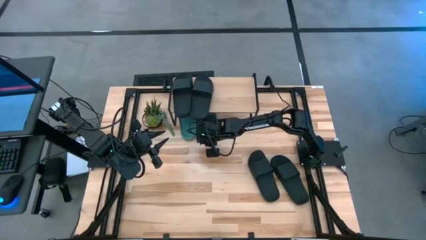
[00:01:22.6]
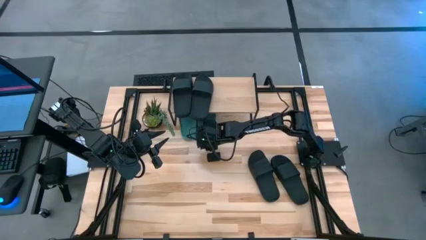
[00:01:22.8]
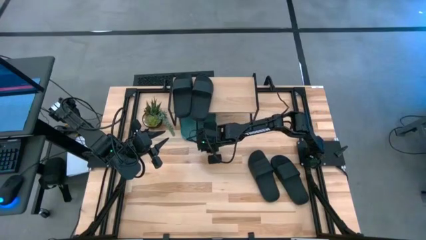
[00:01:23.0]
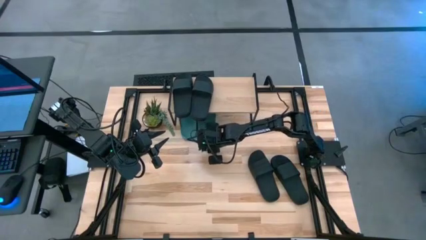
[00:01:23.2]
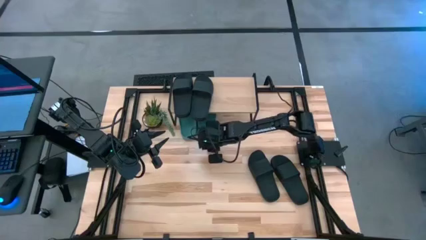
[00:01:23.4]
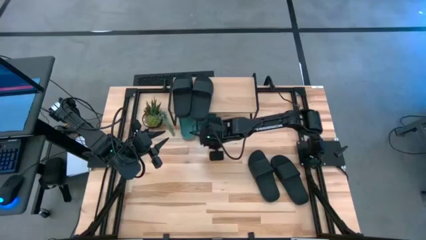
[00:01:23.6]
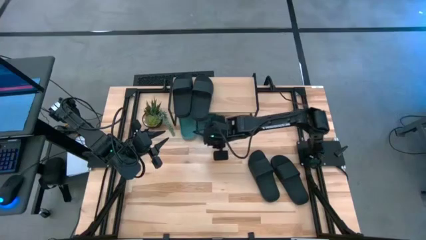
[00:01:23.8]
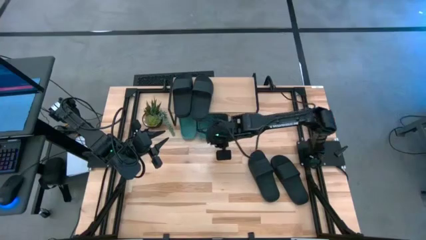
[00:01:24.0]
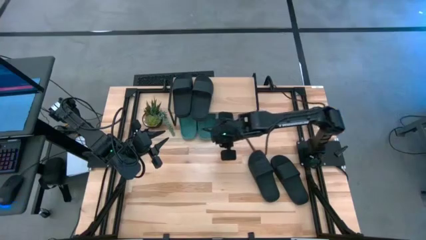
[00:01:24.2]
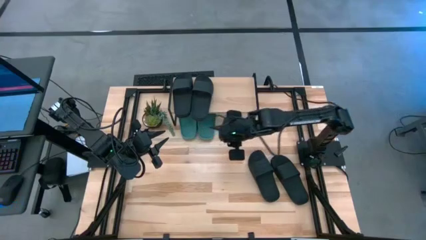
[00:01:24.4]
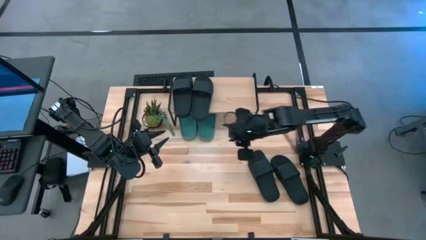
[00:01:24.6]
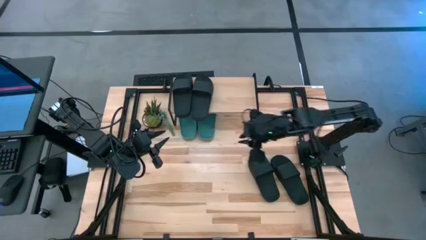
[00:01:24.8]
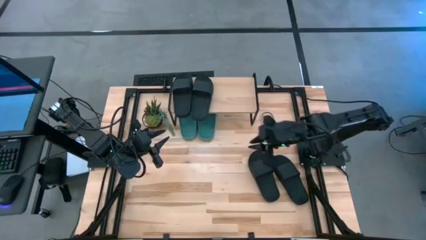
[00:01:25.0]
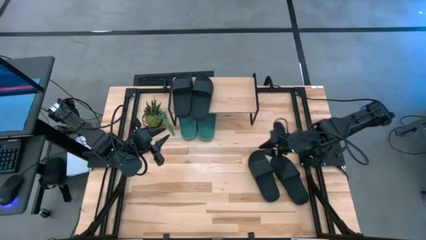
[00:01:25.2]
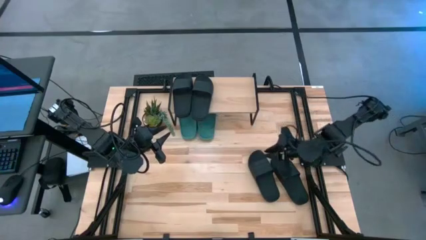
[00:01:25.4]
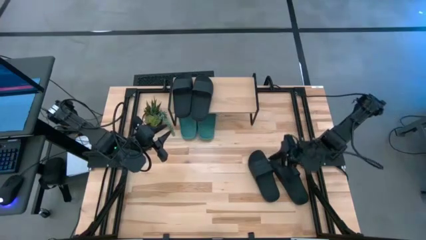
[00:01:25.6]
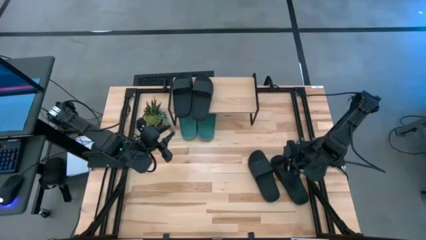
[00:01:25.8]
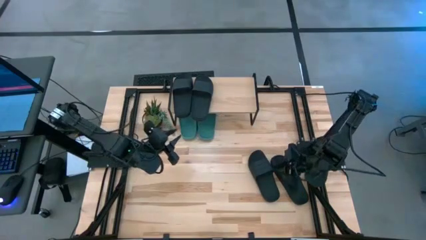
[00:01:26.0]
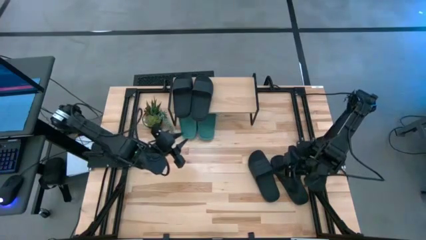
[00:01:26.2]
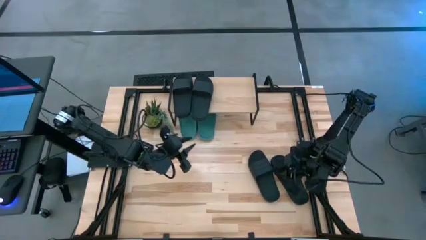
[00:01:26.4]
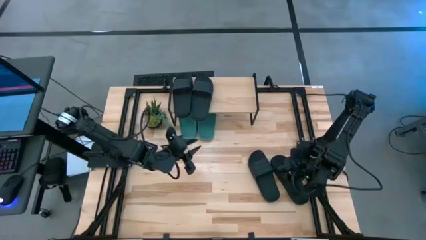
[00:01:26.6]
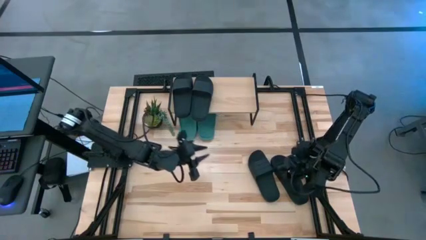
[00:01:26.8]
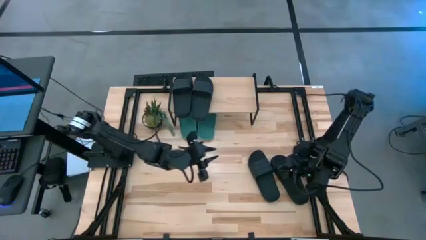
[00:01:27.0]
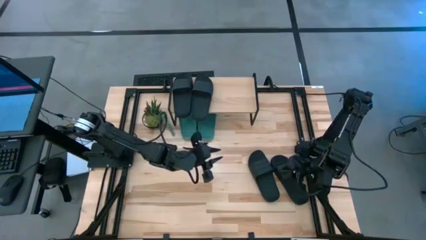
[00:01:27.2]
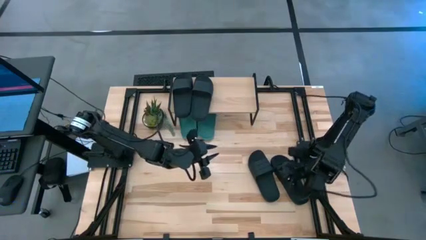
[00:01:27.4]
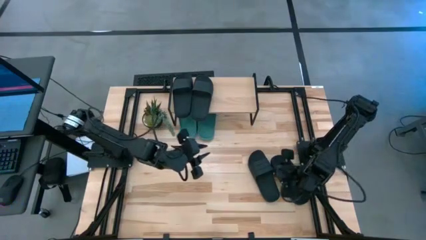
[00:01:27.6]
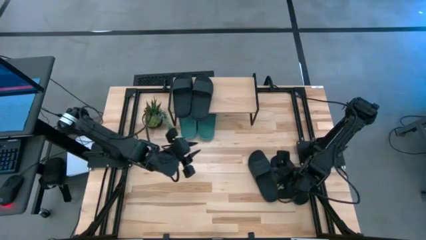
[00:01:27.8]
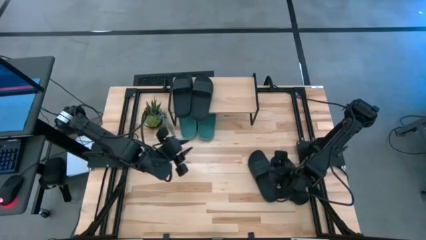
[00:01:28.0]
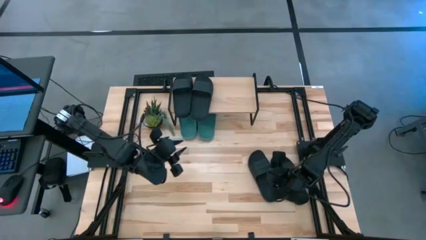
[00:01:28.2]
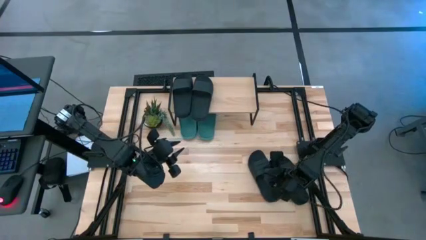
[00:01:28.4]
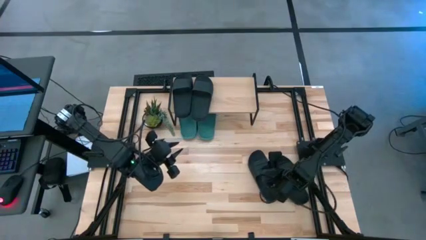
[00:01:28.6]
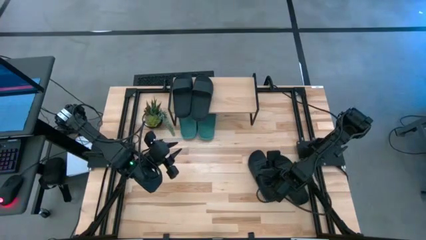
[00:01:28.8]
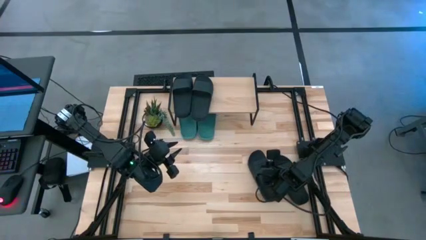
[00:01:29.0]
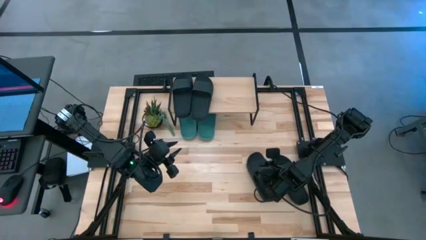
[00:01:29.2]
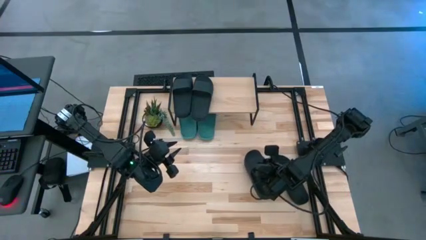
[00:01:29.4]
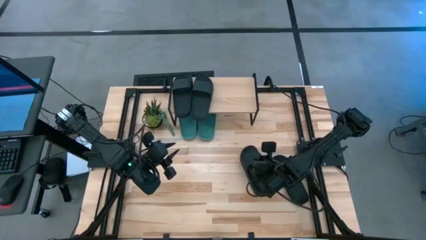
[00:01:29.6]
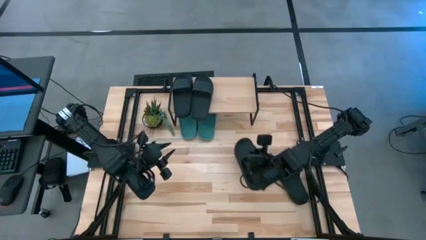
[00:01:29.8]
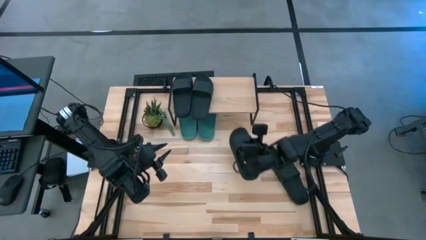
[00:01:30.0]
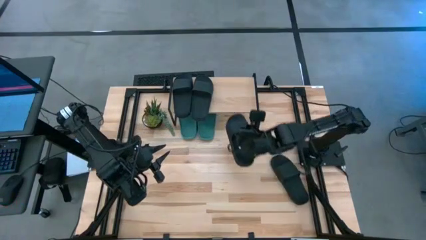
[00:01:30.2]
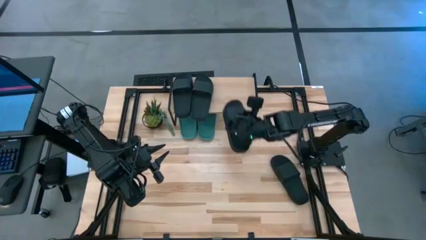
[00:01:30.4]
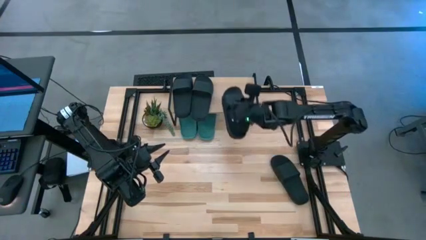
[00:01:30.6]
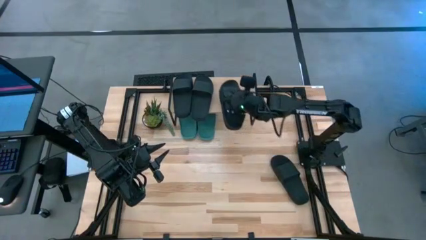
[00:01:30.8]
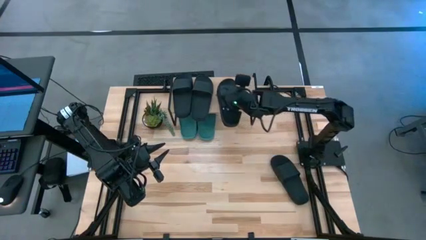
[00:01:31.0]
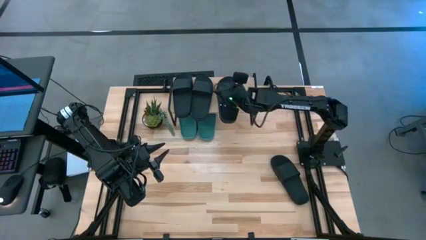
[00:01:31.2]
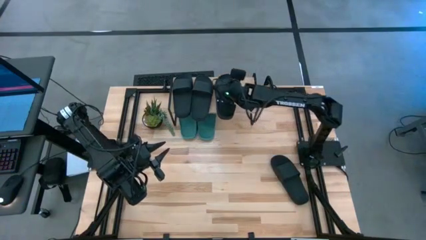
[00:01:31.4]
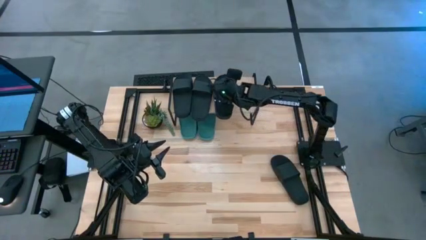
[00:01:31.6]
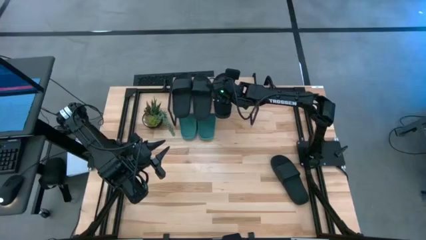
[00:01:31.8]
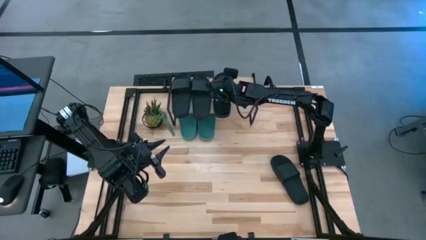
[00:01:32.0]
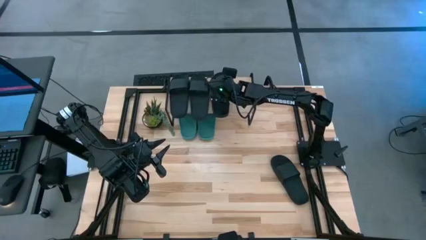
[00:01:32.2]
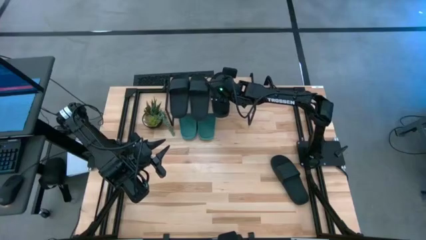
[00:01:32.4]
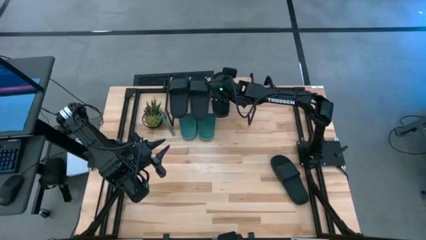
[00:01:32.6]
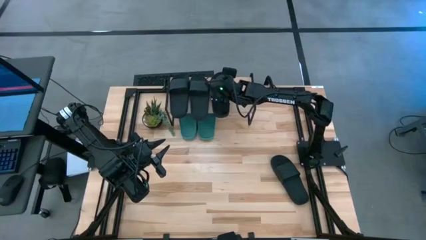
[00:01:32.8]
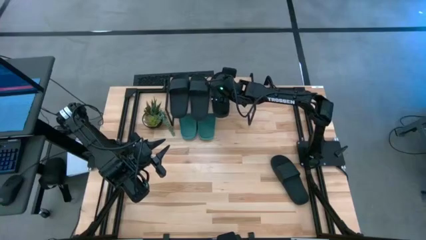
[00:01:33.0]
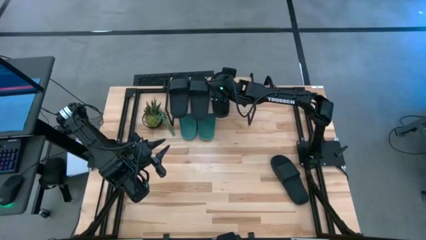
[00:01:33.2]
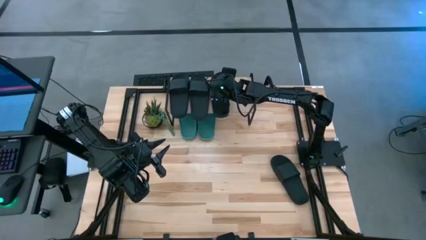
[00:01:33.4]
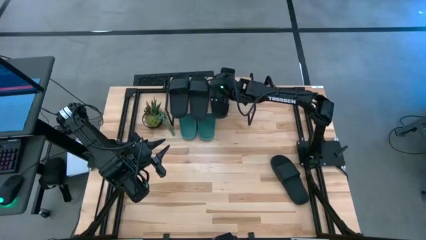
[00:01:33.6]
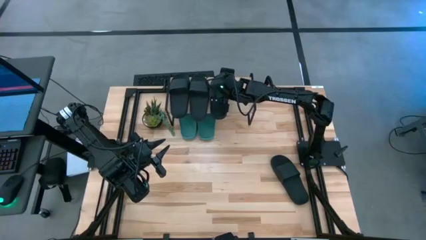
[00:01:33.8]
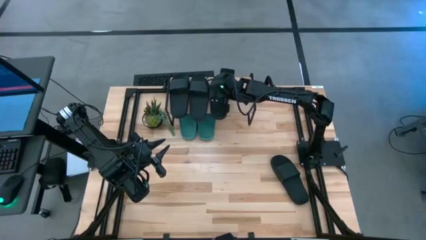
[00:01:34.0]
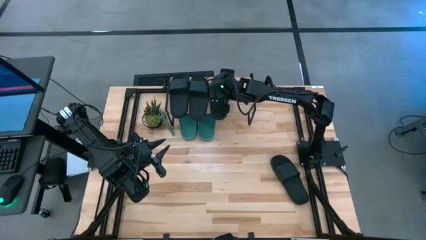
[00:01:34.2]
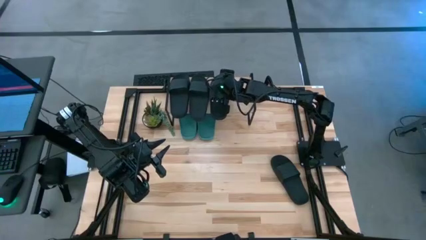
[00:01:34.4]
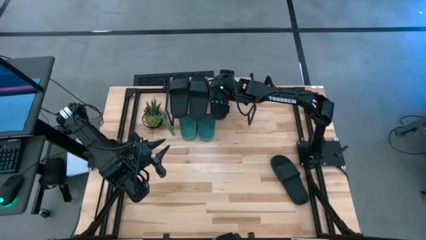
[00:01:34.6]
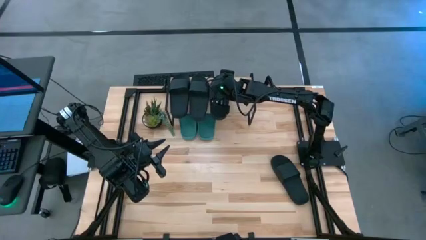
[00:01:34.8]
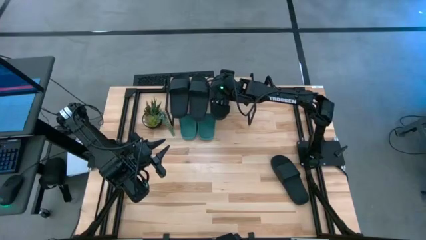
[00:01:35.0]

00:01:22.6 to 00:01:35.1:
Task: Pick and place slides into the shelf
Put the black slide on the shelf

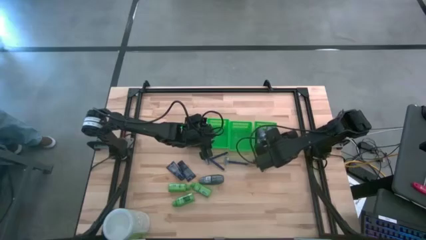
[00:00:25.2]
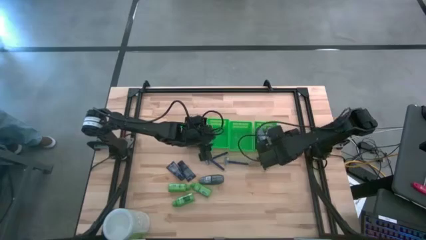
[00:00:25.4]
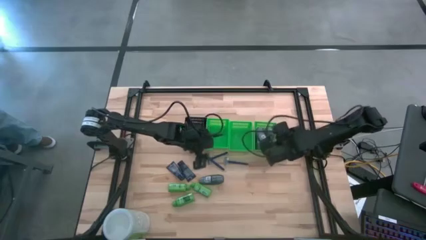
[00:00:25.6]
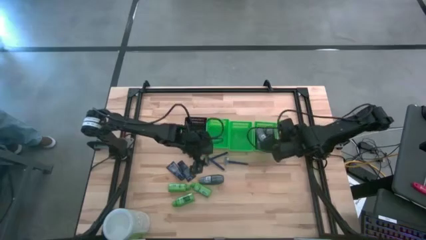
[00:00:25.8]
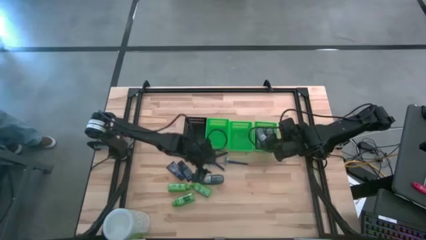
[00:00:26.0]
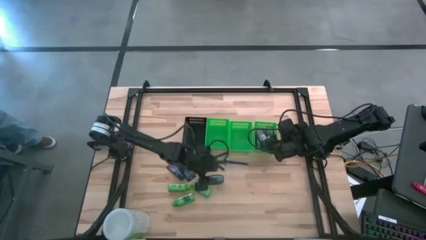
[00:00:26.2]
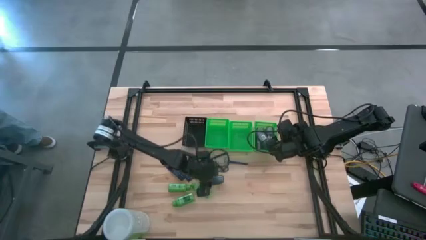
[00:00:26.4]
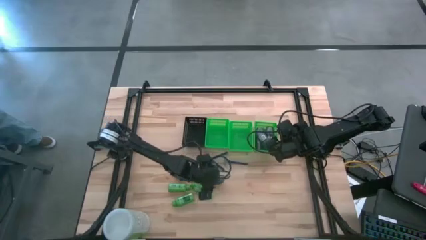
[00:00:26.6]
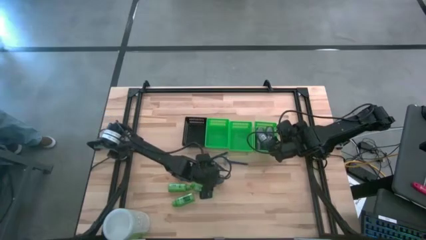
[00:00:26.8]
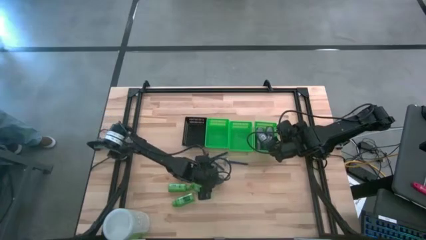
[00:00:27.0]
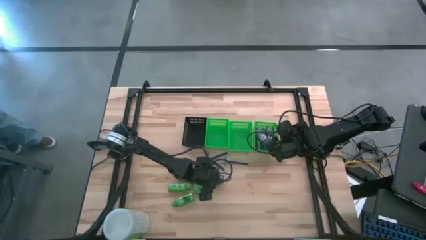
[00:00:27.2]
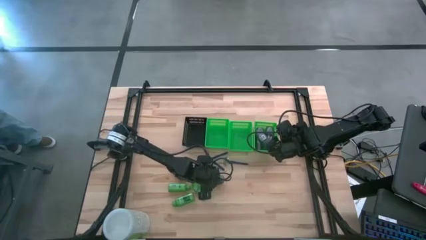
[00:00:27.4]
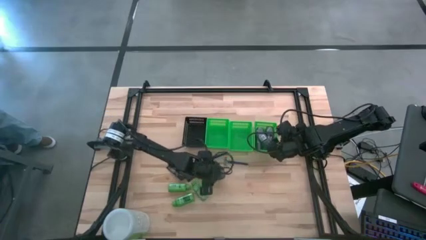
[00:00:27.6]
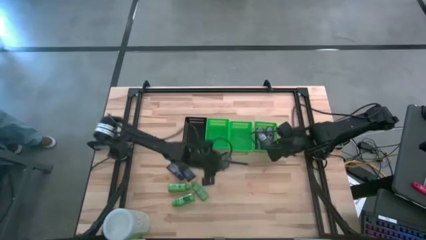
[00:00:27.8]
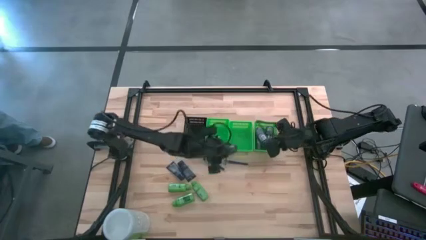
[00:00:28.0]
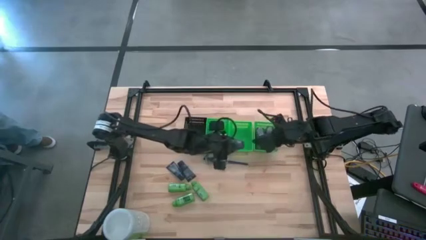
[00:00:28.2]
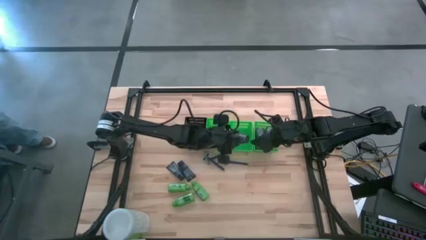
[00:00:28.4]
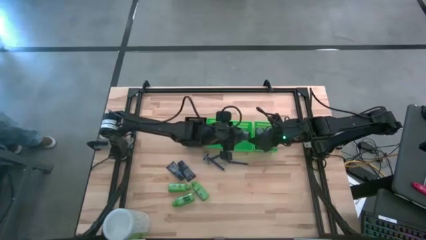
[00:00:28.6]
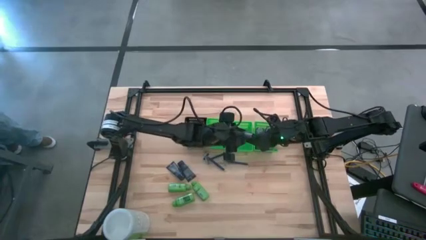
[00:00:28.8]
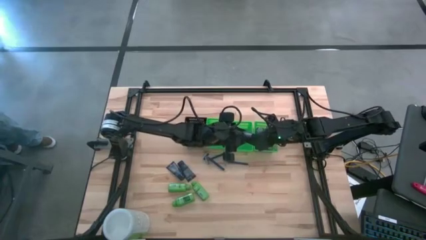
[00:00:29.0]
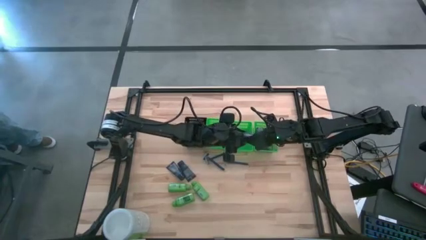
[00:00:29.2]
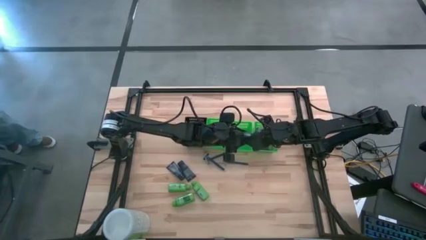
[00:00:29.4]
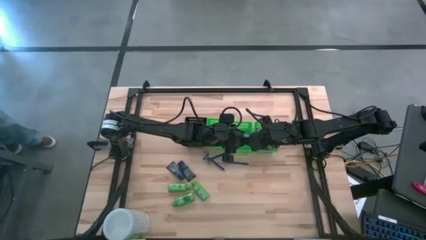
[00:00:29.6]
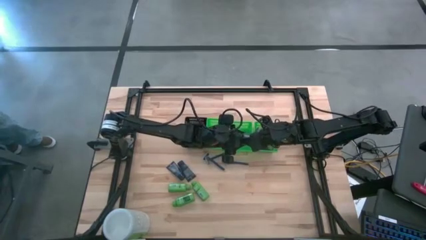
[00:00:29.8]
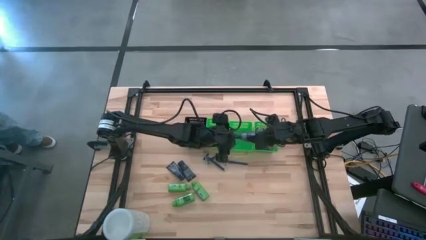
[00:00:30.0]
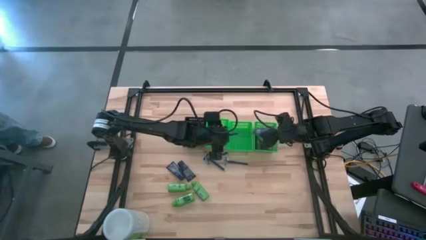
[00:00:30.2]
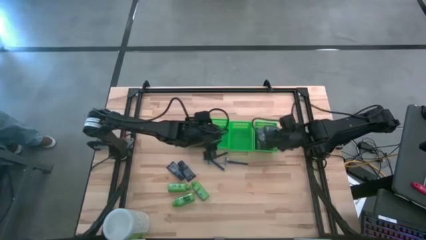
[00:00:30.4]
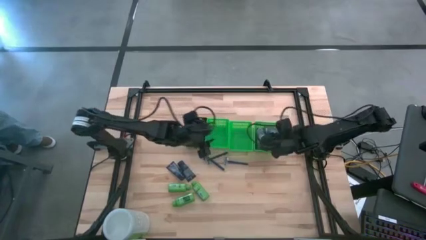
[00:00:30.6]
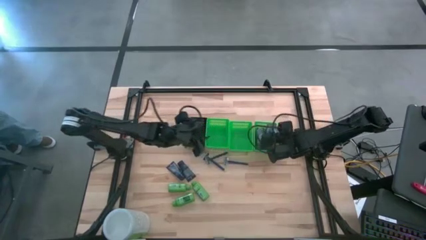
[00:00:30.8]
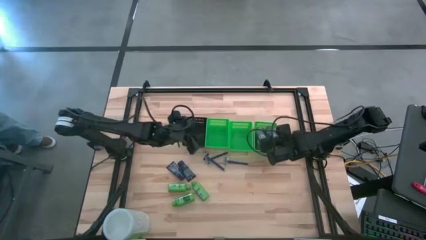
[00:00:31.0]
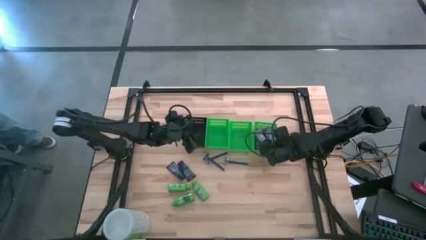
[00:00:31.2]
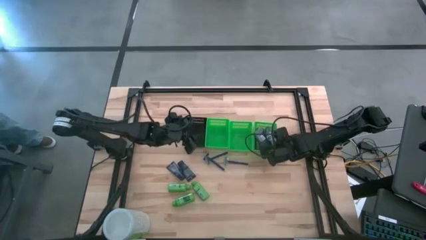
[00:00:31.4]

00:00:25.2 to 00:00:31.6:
Task: Pick & Place Travel size toiletries
Put the gray deodorant into the right green basket
